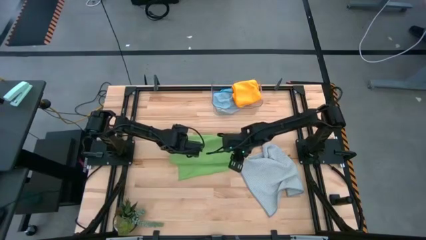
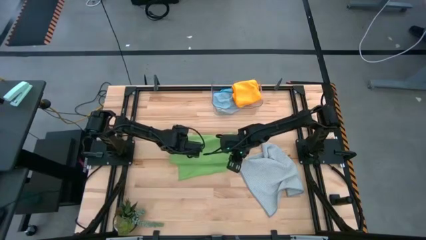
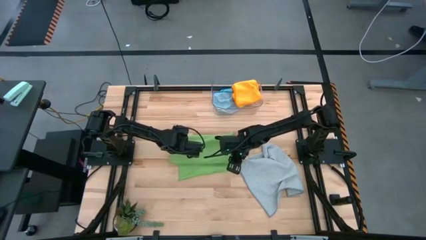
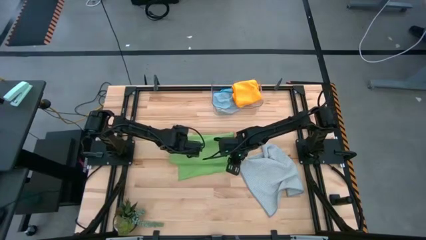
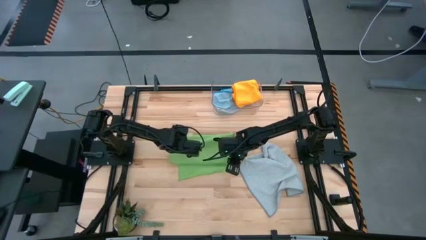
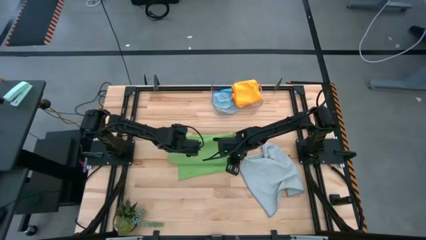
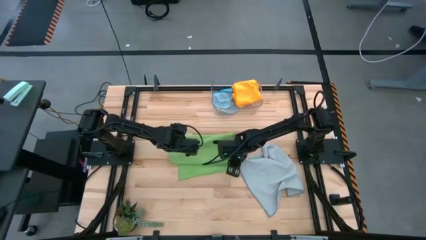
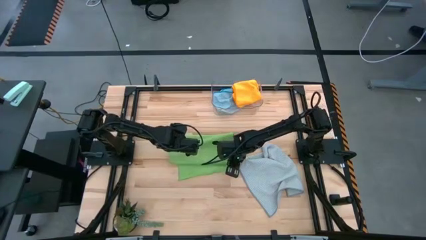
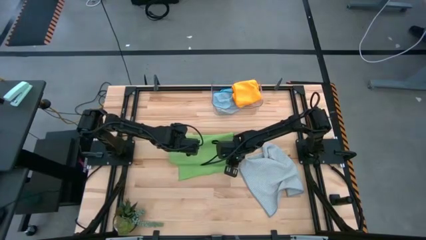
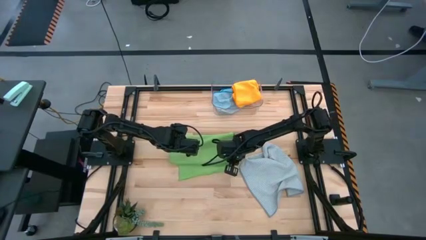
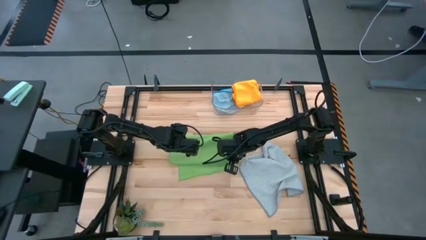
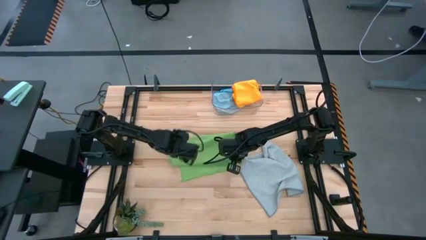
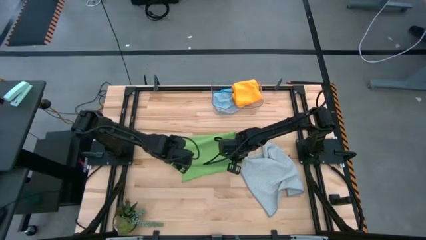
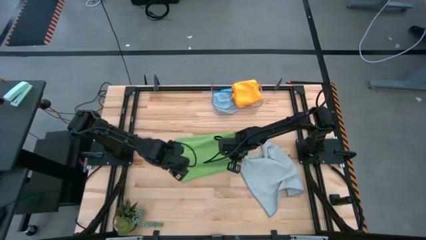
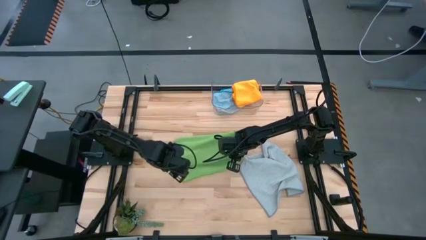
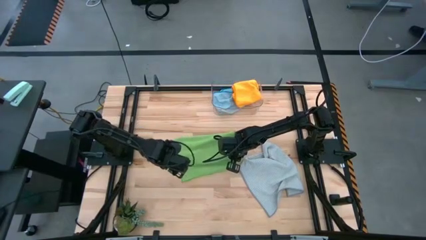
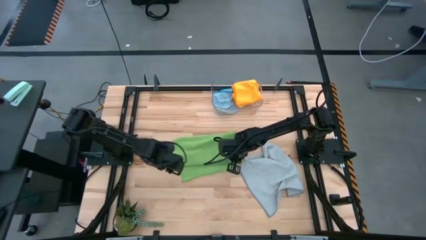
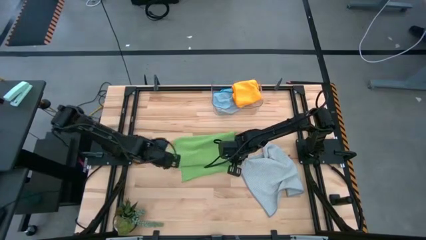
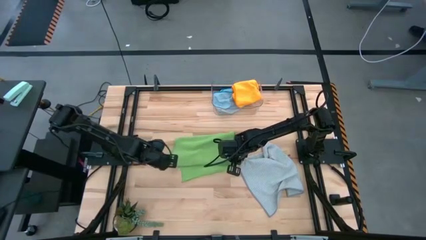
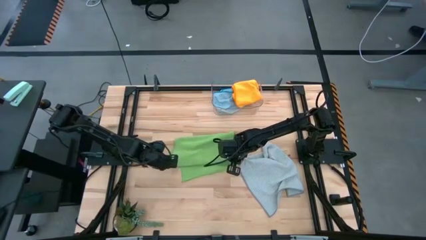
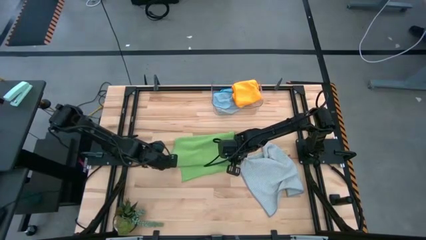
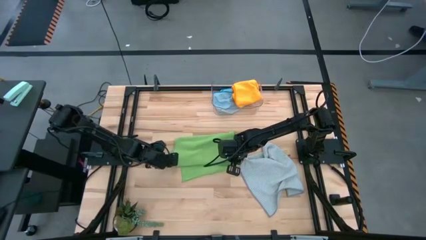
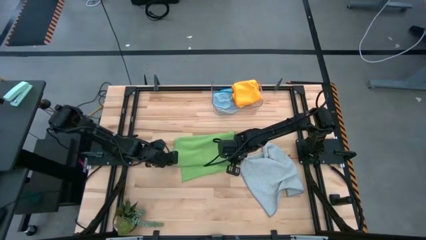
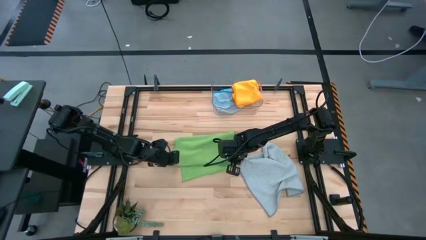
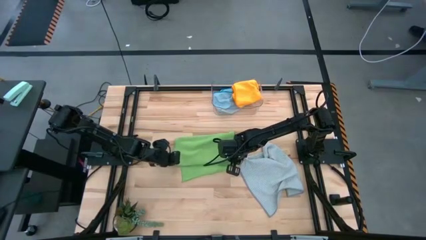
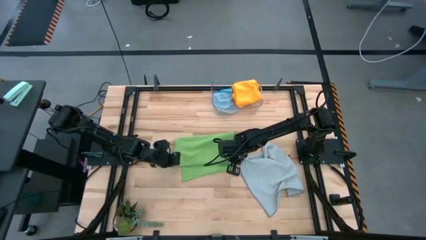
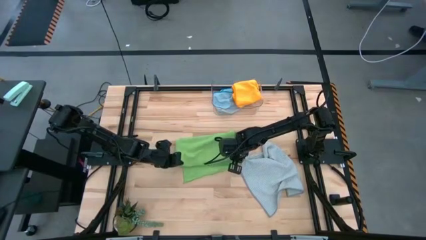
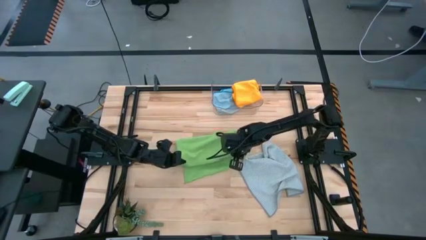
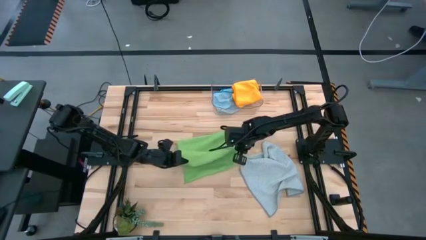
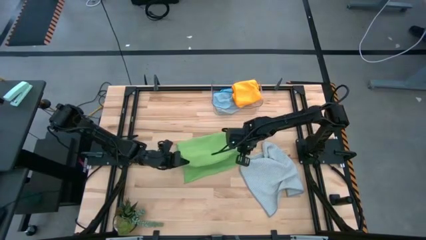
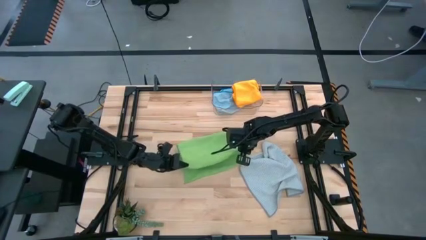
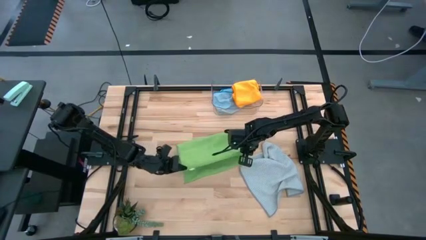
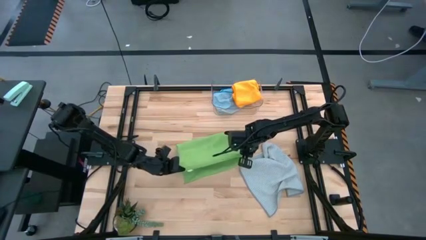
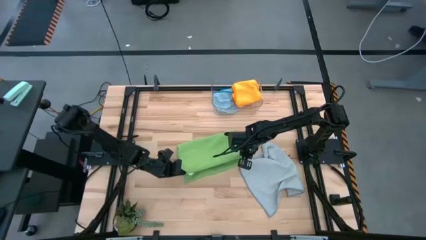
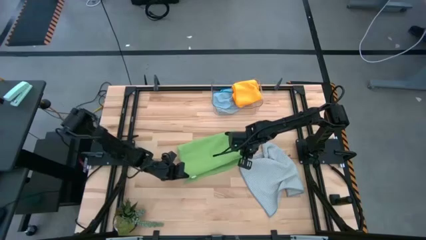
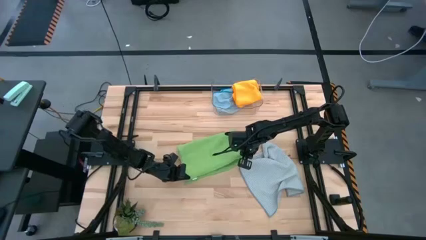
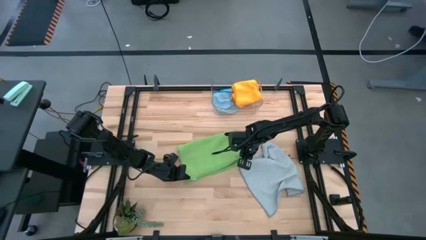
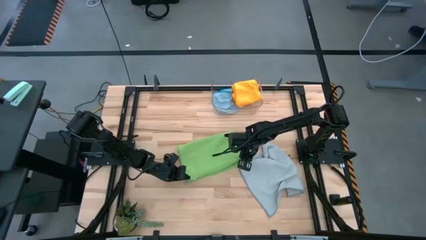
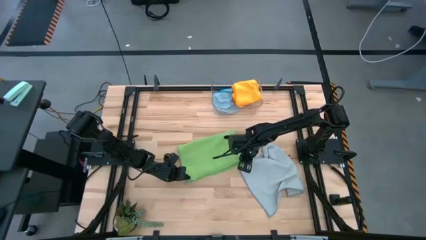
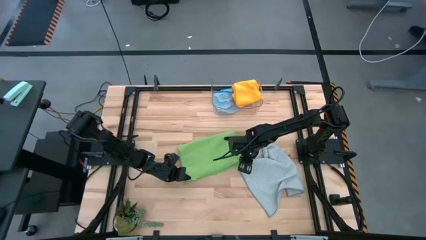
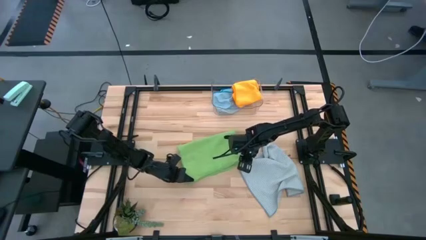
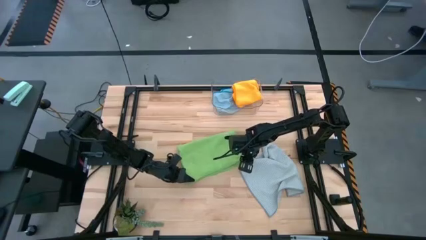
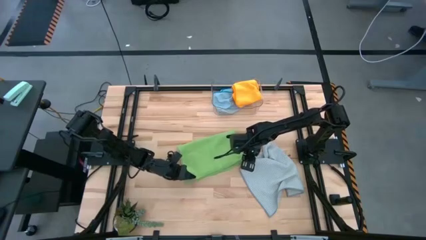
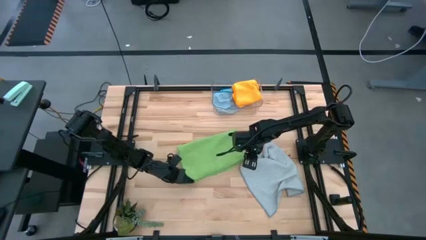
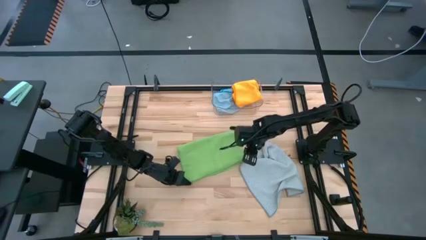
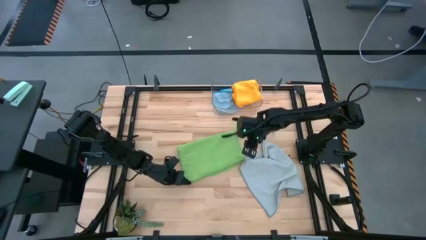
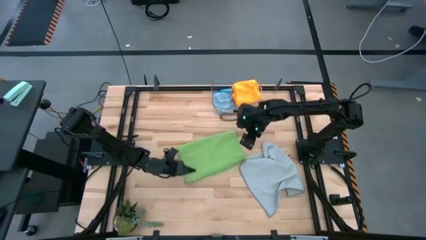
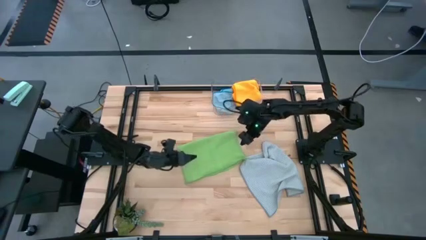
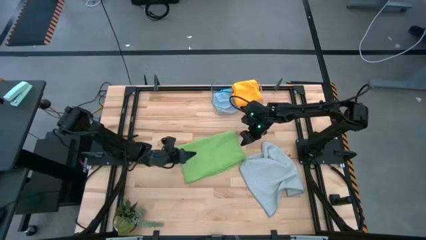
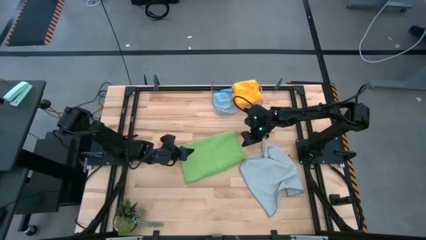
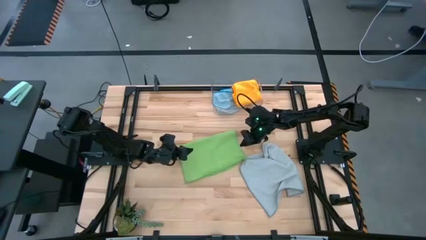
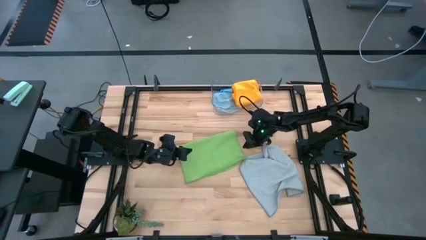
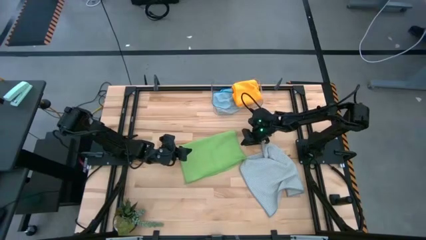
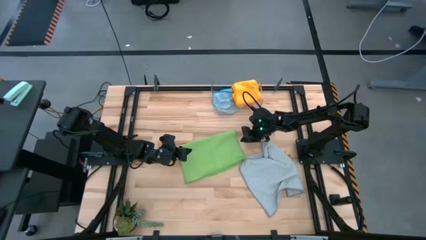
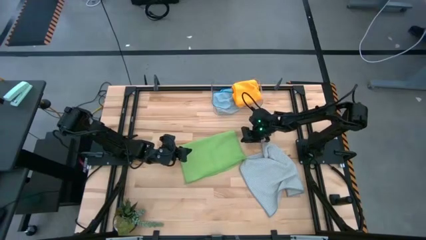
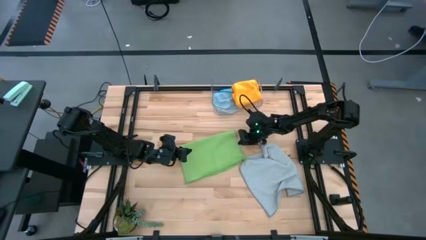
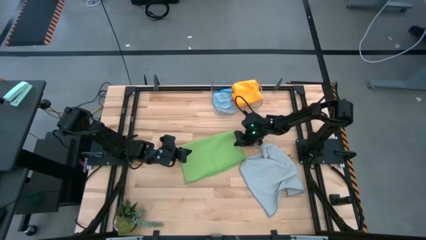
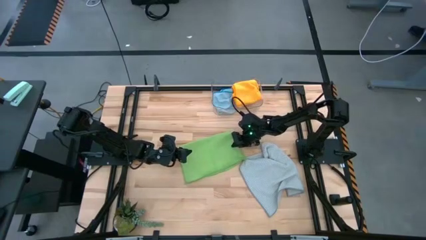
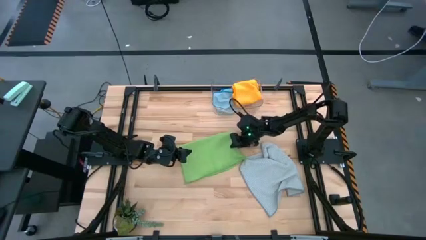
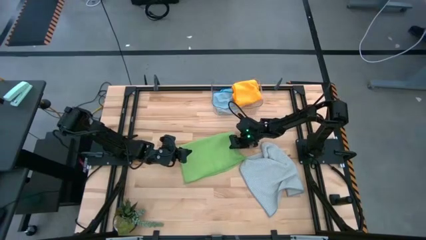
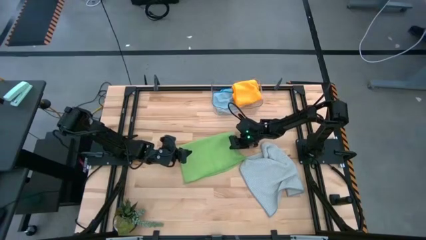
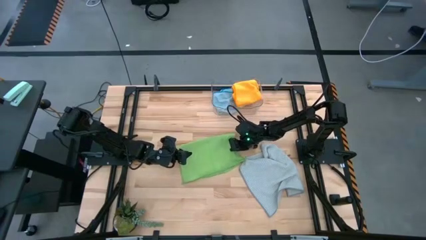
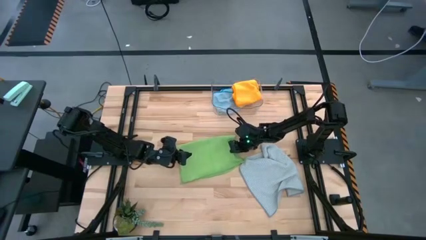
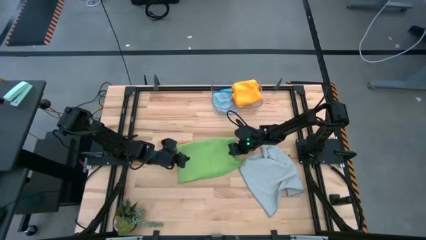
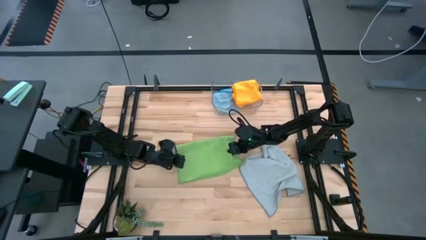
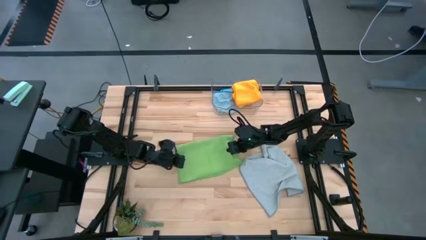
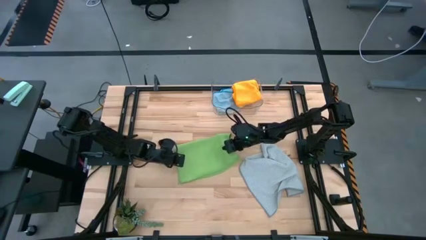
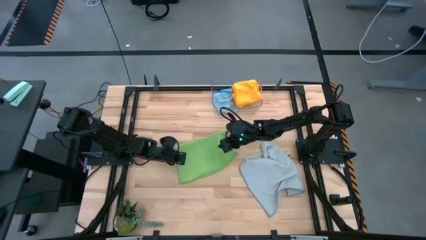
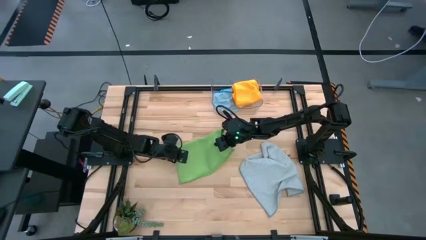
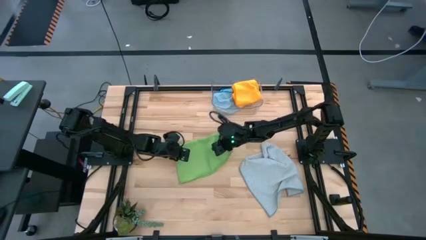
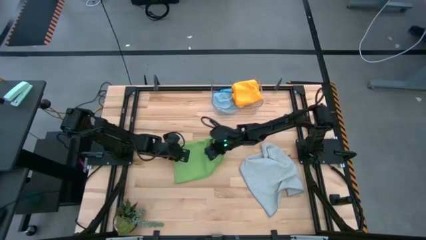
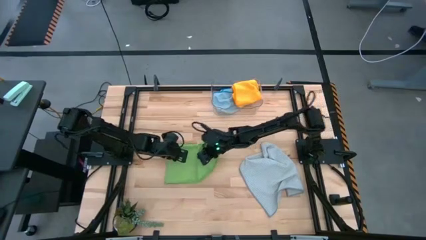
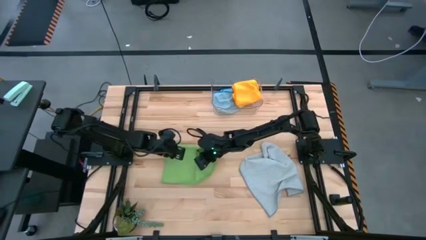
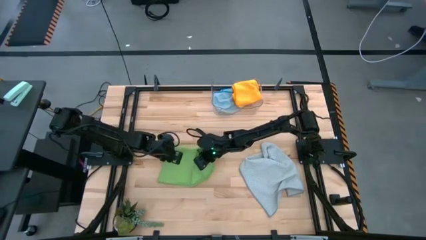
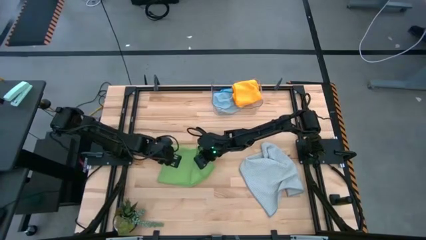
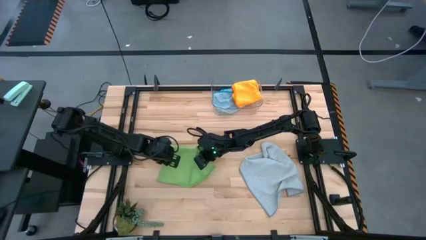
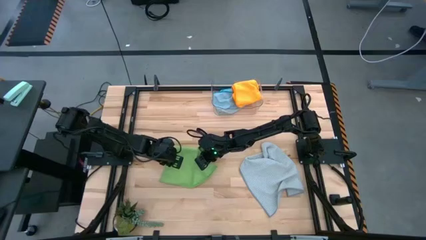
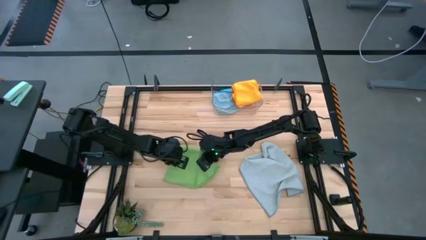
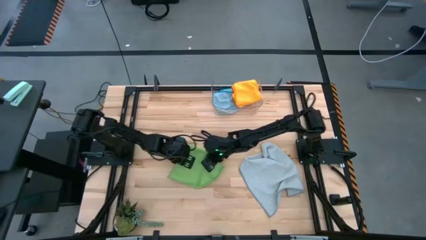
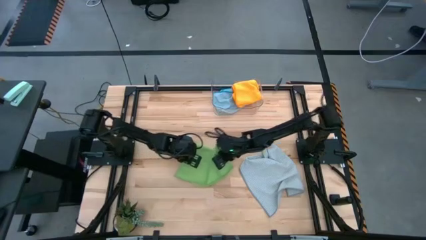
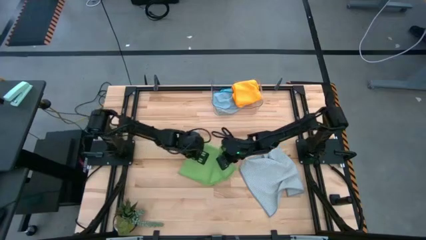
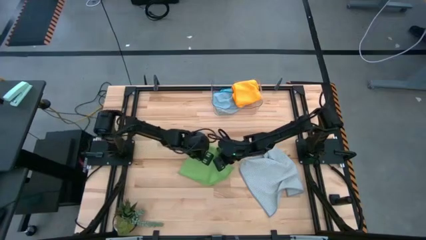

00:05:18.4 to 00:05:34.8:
Task: Fold microfiber towels
Fold the green microfiber cloth
